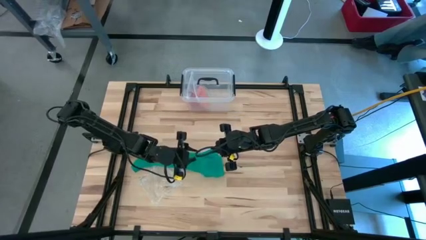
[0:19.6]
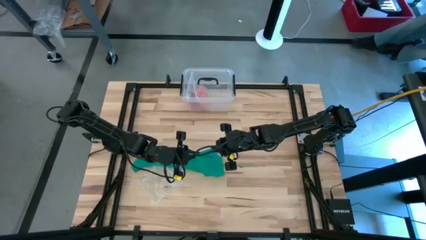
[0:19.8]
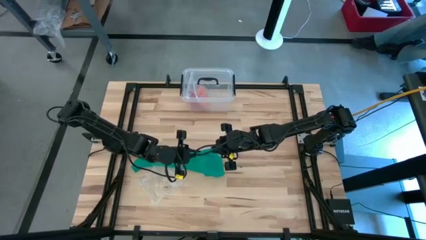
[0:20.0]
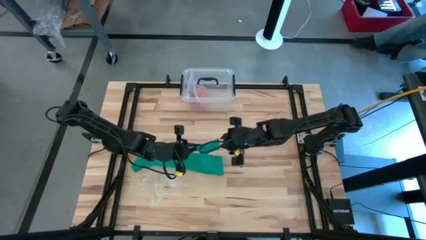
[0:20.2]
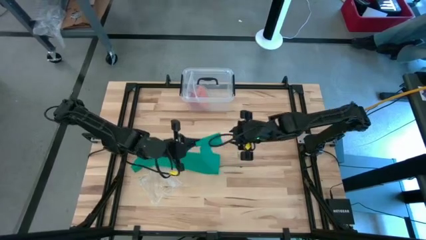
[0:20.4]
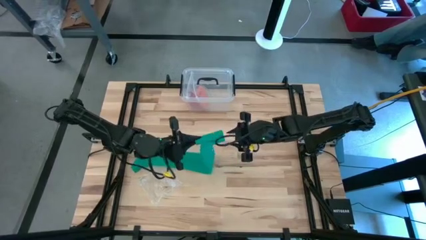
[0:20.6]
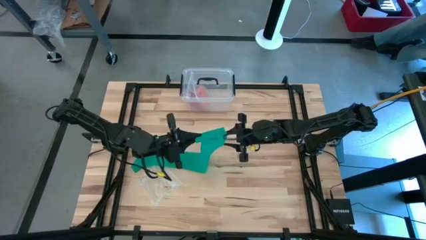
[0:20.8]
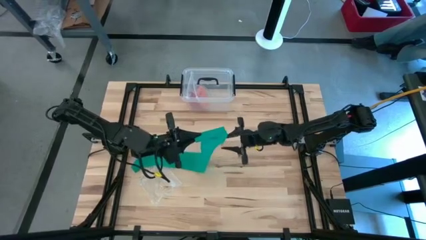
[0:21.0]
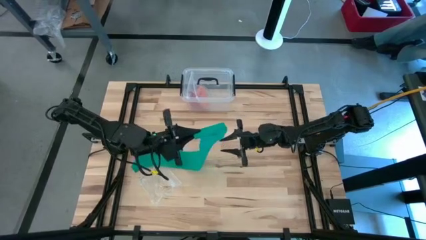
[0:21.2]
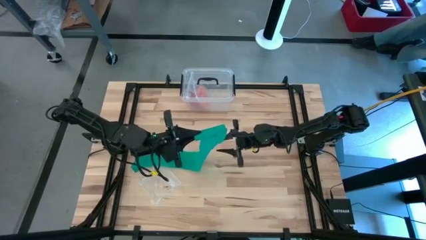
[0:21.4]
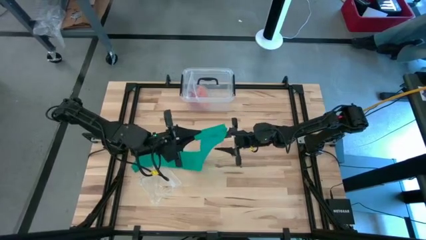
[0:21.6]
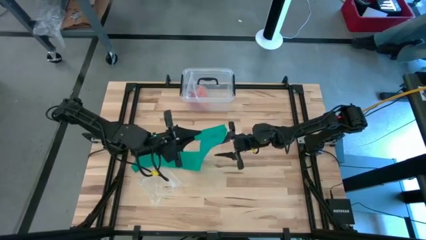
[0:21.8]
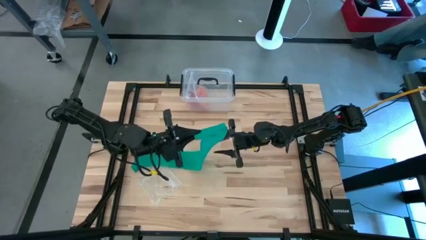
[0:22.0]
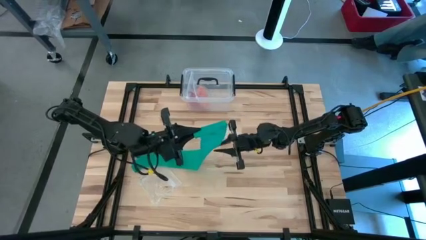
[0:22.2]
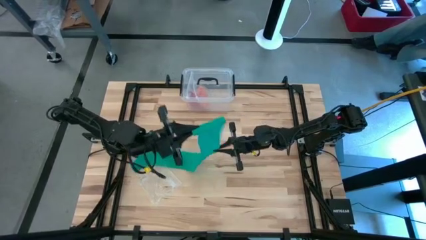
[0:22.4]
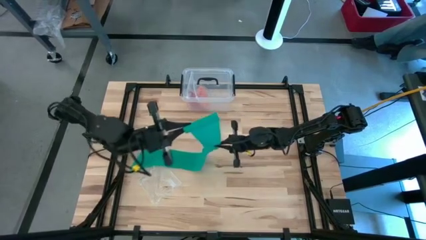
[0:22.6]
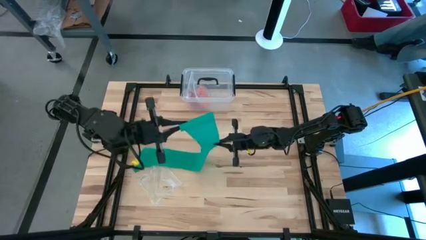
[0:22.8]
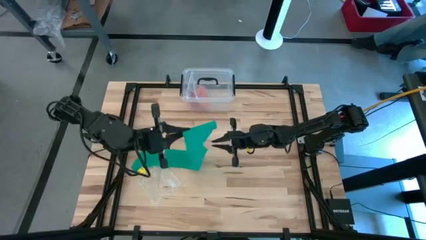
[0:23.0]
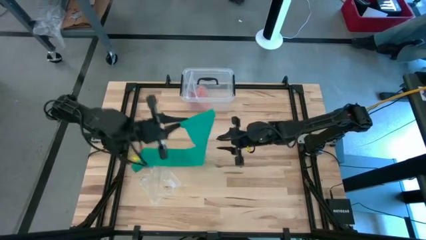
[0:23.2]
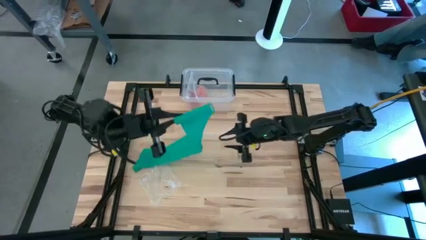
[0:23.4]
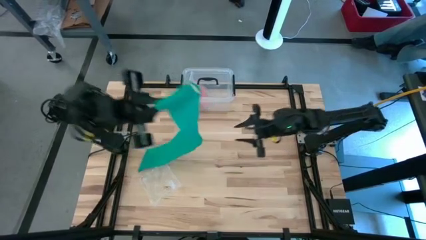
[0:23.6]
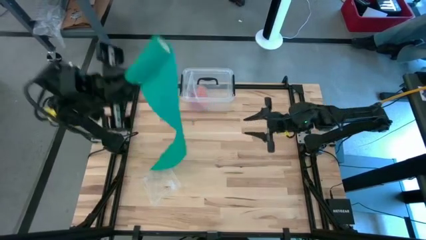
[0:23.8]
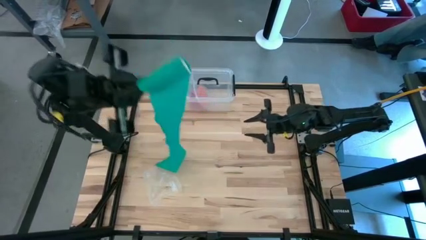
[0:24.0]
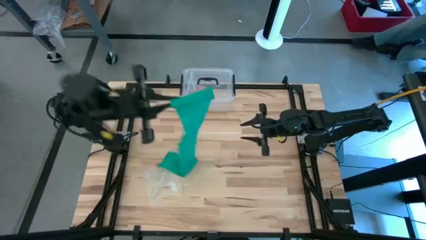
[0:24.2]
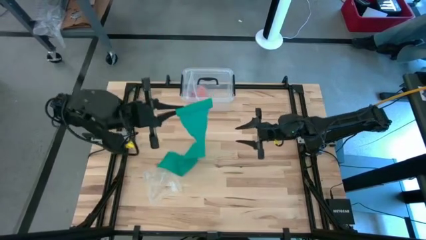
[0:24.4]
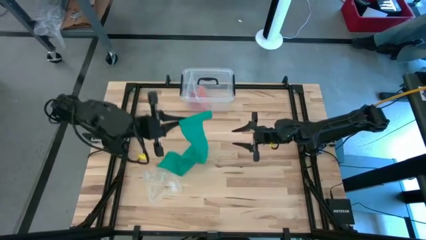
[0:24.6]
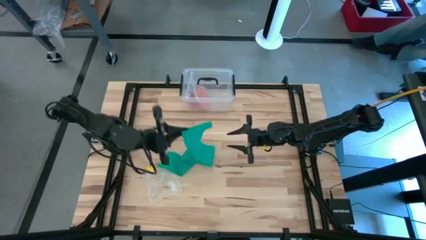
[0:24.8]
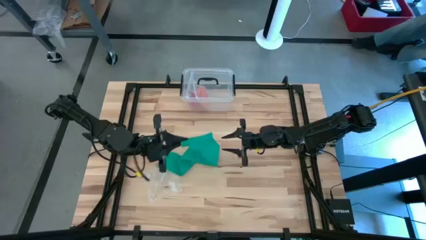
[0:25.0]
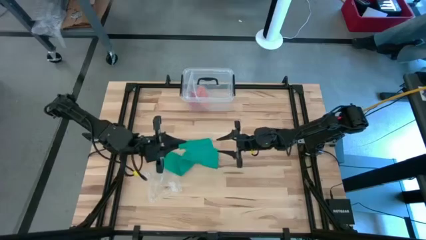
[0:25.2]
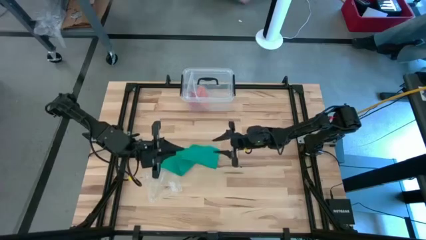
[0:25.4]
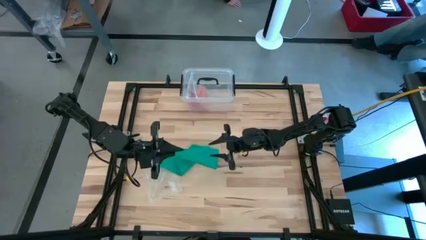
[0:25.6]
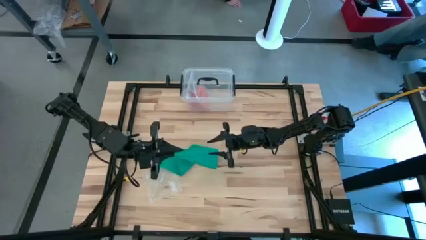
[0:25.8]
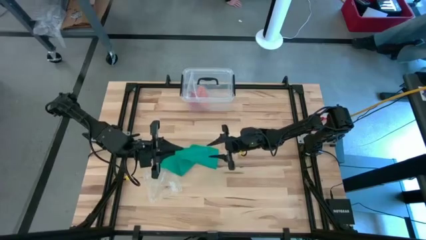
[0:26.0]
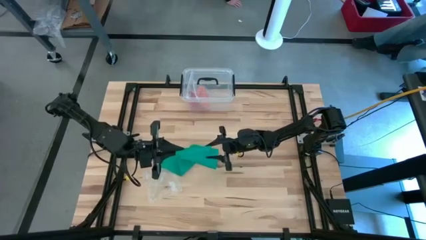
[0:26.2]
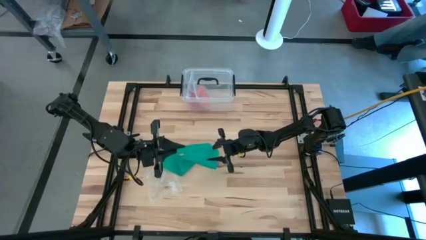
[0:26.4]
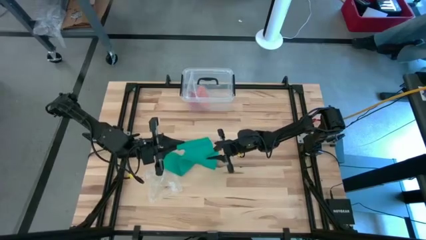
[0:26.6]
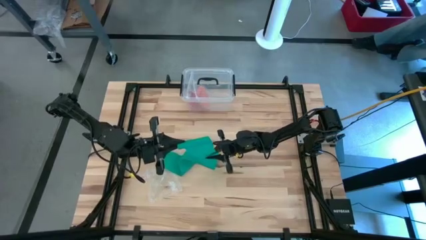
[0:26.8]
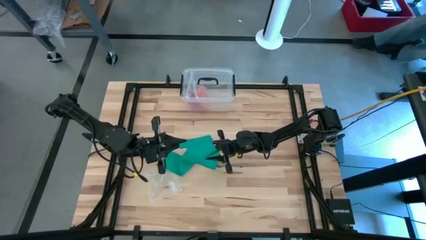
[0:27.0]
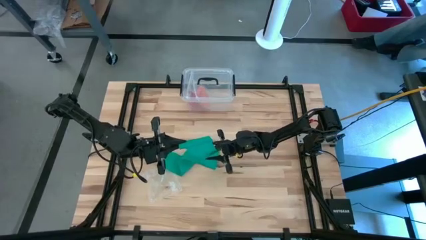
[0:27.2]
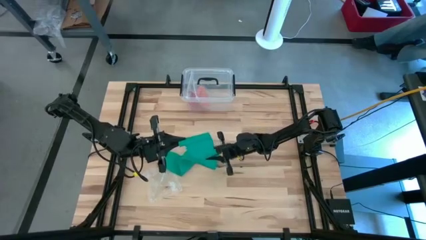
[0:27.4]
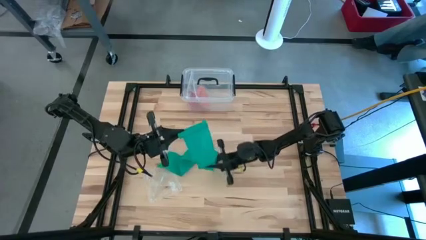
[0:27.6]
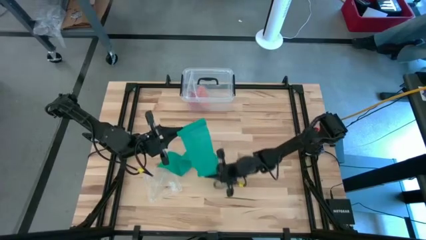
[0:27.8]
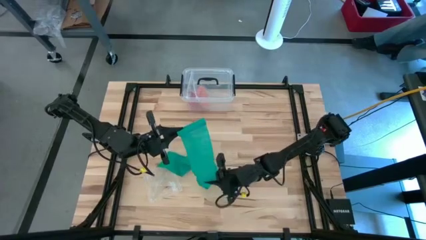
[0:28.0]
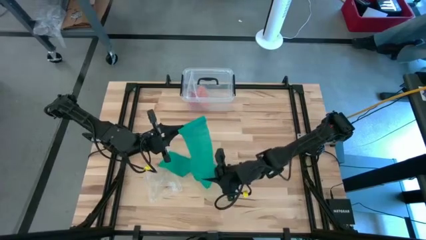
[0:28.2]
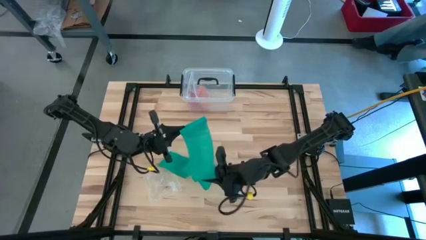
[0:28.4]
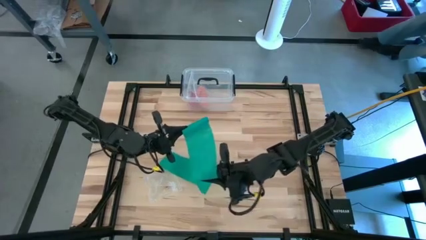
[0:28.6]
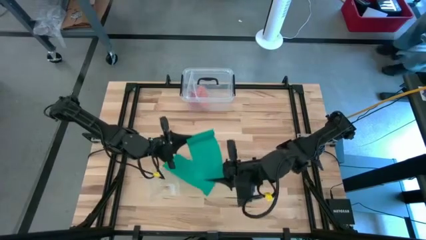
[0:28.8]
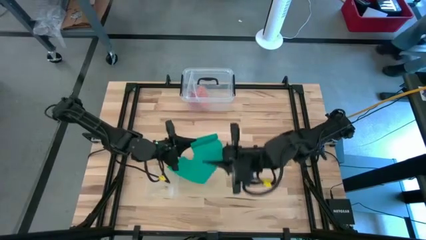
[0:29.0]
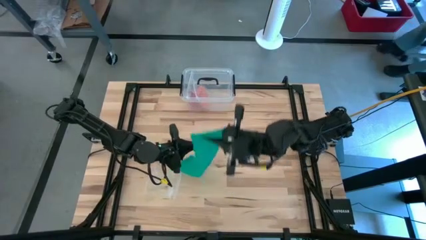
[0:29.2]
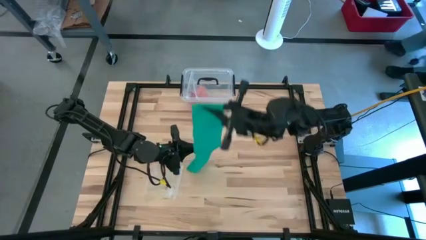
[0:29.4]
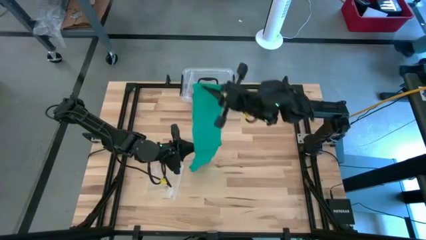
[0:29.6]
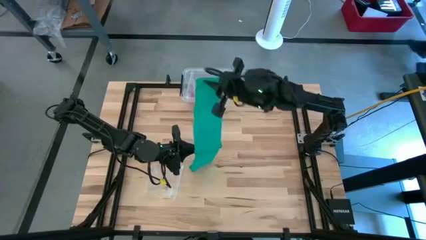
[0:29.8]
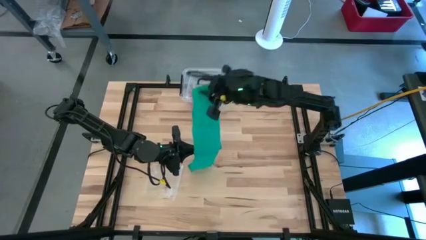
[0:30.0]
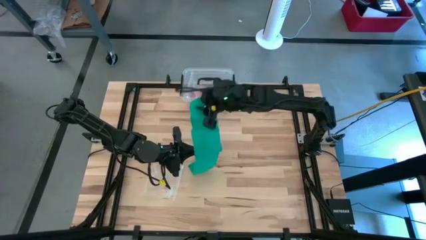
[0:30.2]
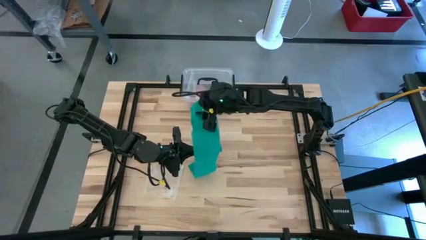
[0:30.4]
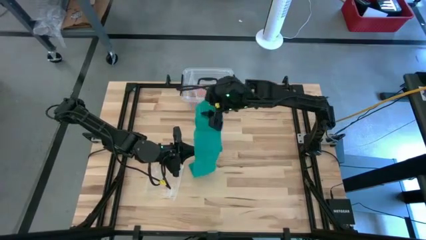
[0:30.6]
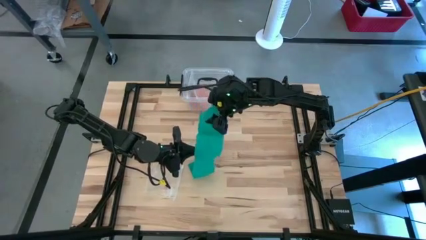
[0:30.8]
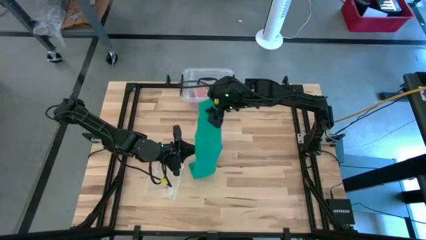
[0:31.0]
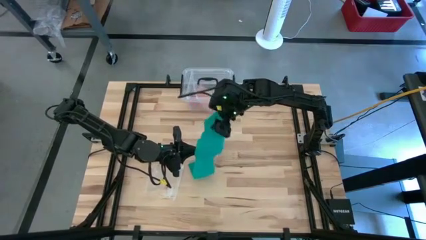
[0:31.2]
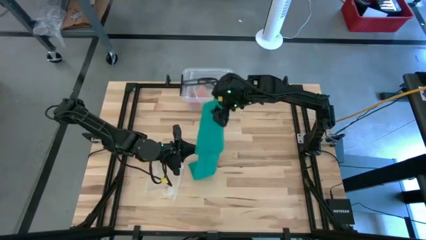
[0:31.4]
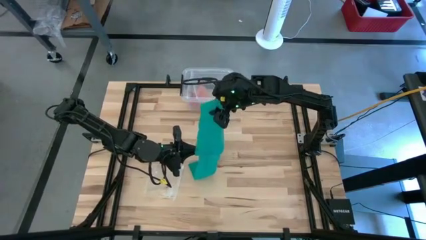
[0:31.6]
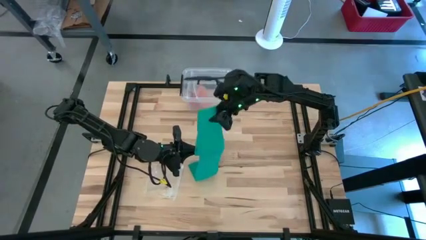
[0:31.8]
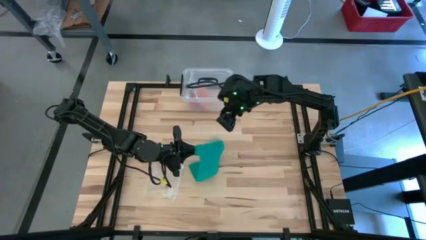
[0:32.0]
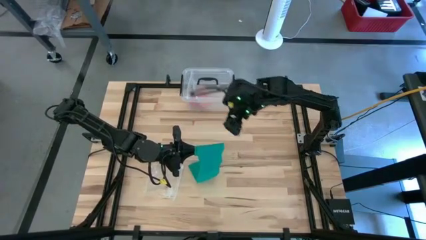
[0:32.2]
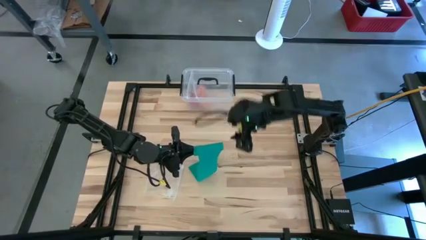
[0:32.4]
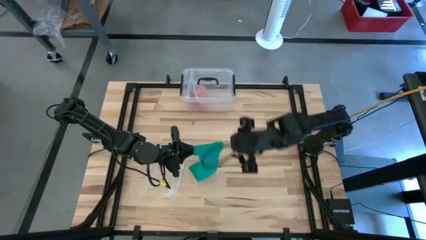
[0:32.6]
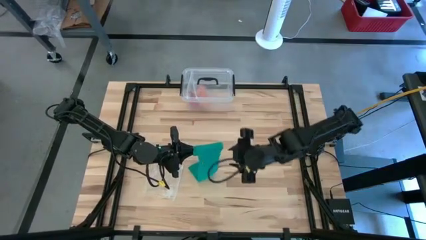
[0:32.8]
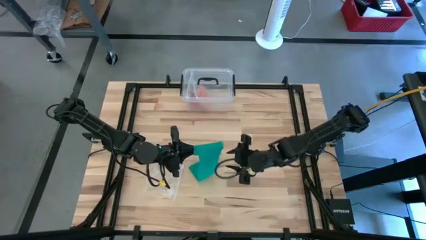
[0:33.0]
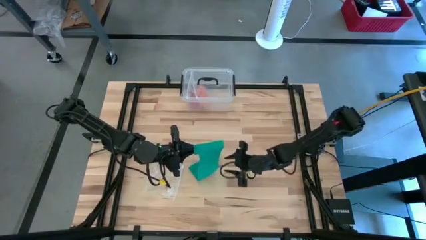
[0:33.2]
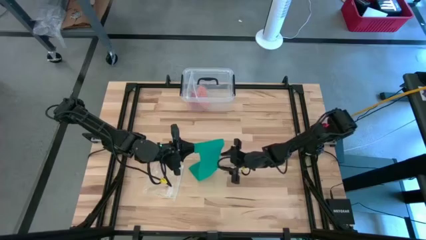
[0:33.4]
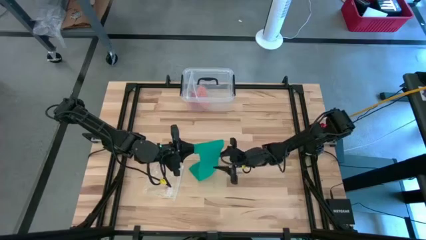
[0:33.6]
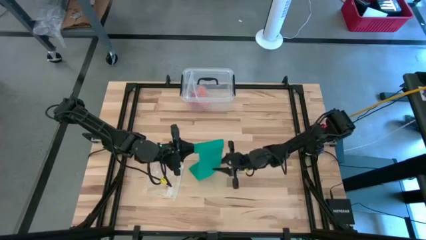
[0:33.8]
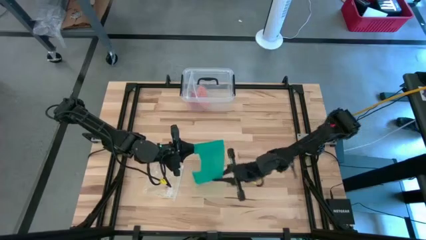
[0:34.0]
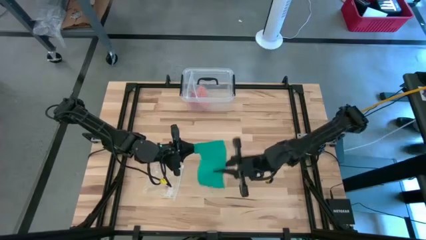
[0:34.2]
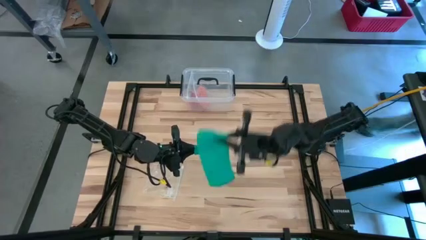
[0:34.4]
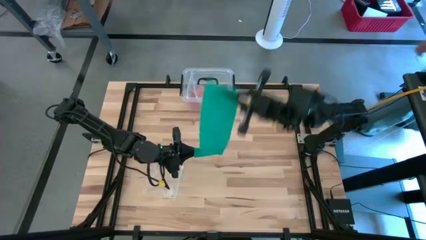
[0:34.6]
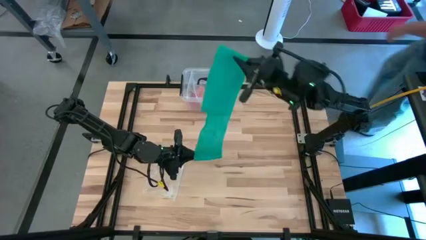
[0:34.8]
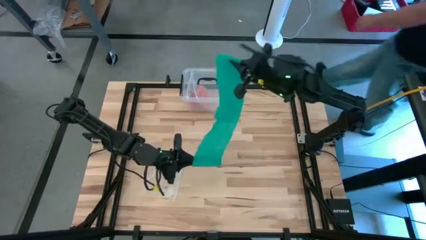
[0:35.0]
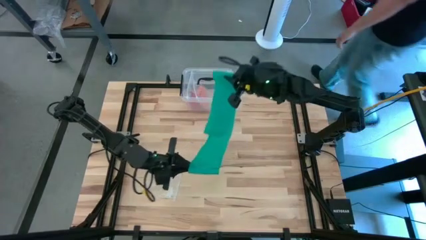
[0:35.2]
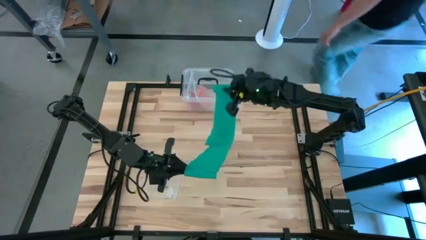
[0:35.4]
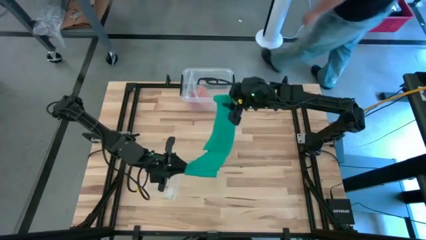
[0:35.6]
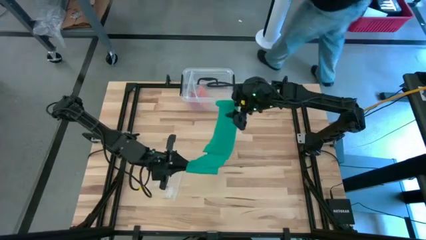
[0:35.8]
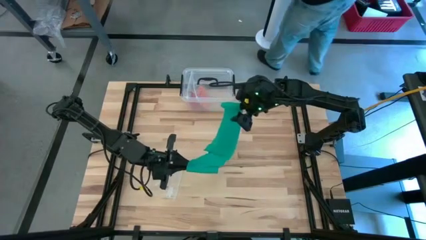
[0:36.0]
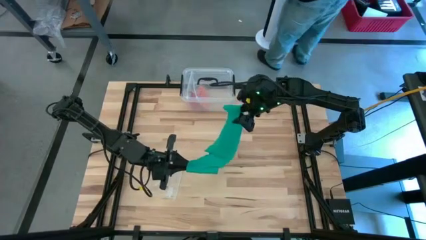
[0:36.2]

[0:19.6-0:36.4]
Task: Roll bandage
Roll the green bandage
